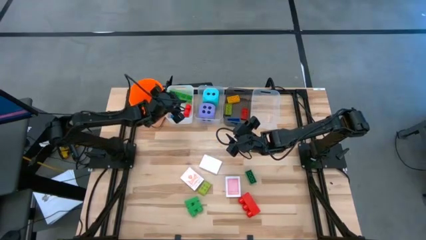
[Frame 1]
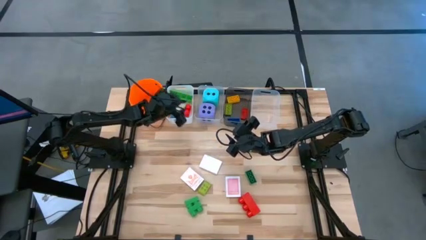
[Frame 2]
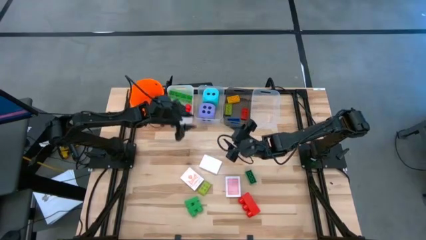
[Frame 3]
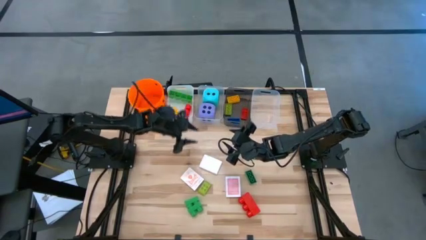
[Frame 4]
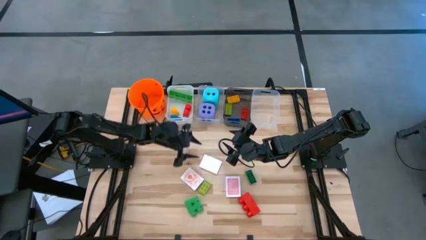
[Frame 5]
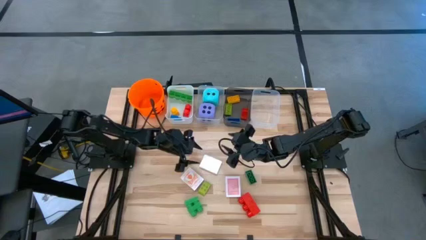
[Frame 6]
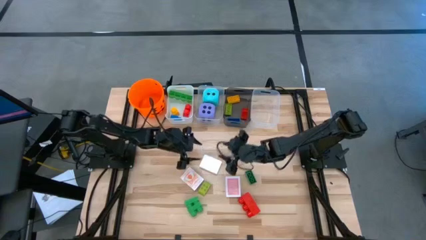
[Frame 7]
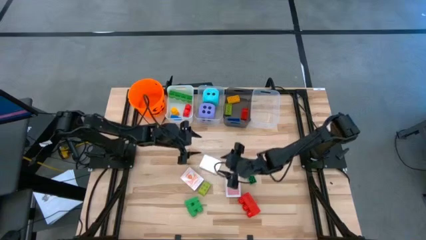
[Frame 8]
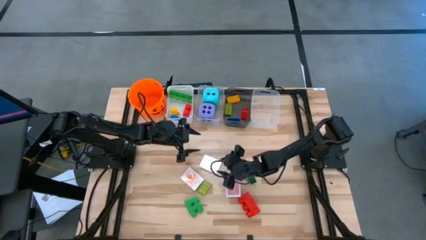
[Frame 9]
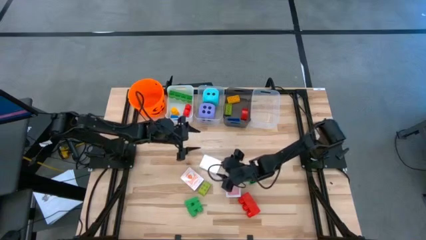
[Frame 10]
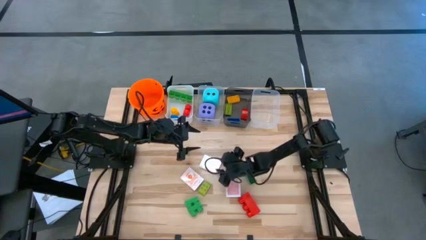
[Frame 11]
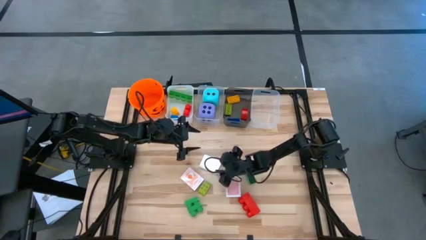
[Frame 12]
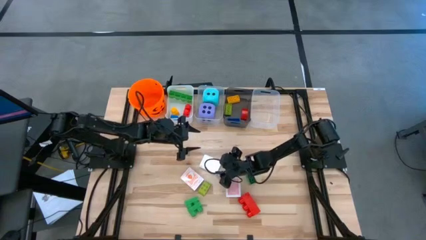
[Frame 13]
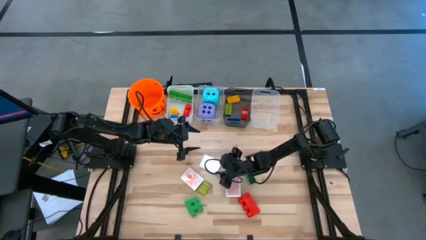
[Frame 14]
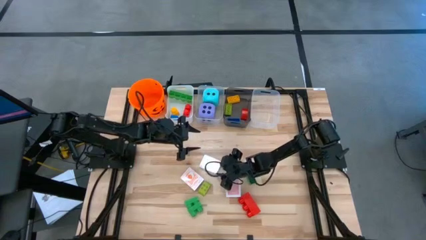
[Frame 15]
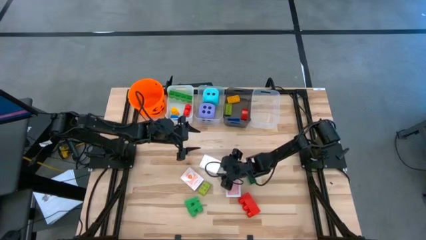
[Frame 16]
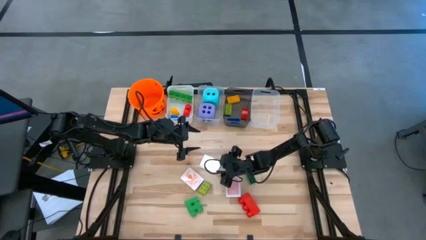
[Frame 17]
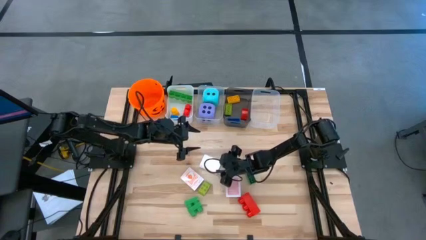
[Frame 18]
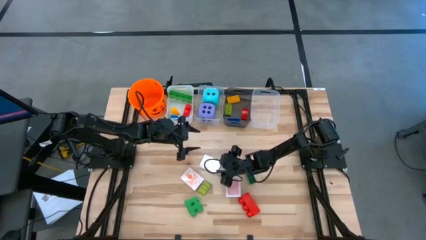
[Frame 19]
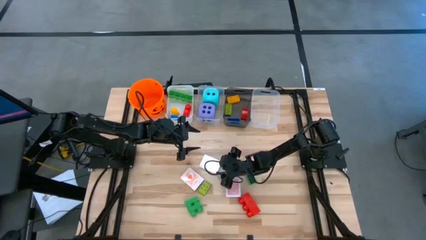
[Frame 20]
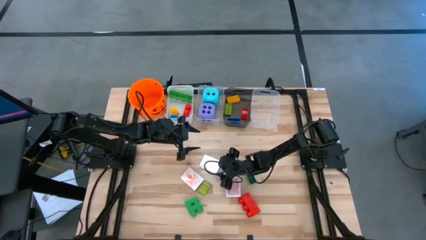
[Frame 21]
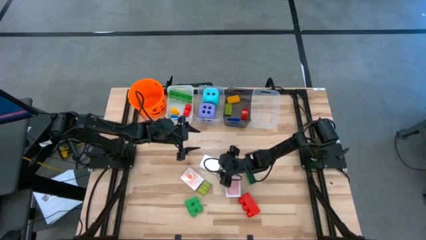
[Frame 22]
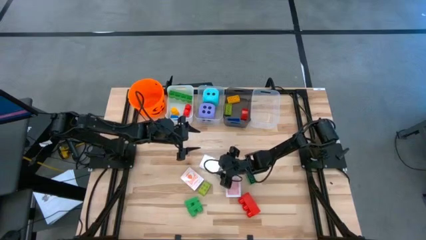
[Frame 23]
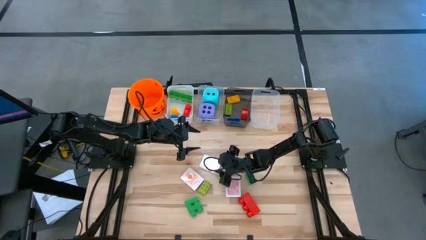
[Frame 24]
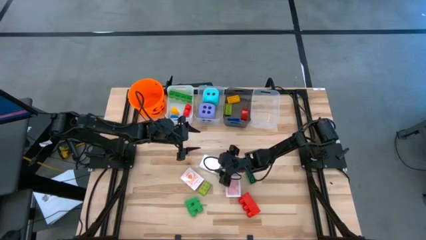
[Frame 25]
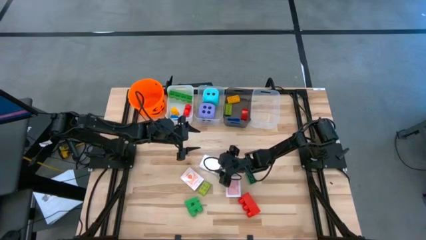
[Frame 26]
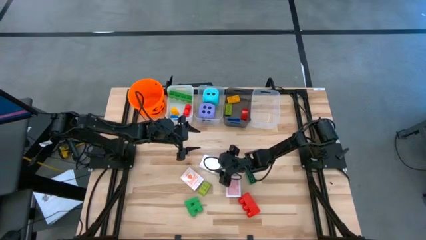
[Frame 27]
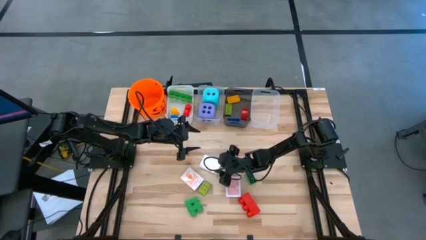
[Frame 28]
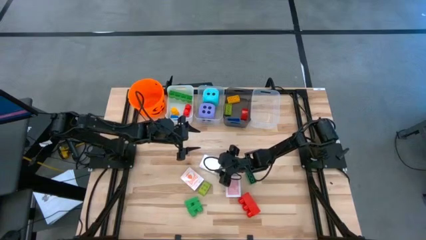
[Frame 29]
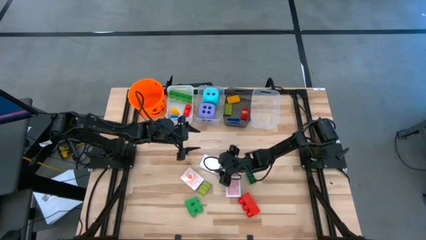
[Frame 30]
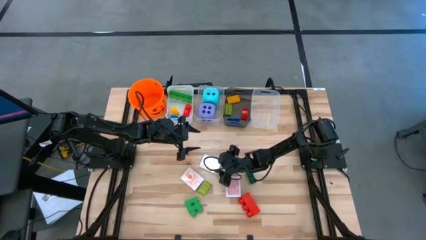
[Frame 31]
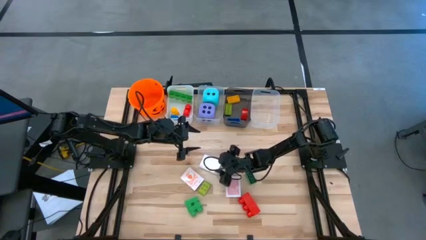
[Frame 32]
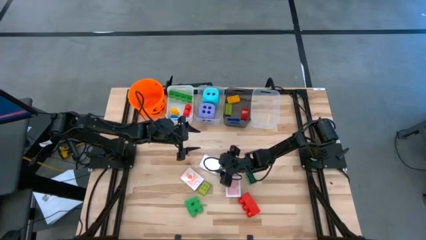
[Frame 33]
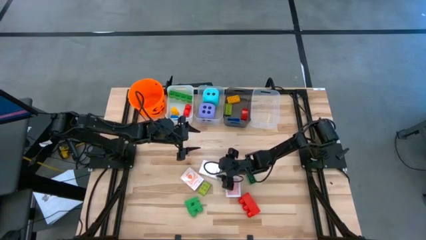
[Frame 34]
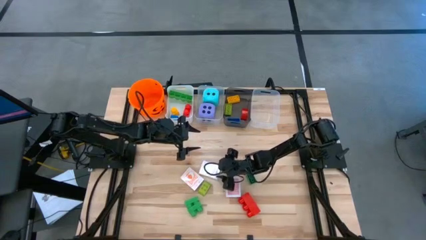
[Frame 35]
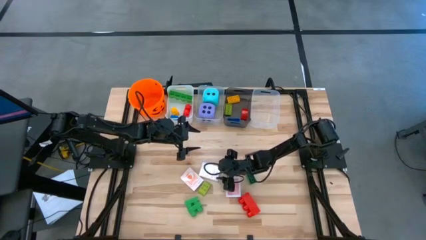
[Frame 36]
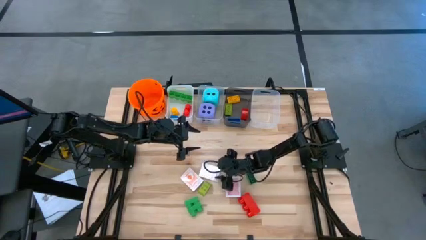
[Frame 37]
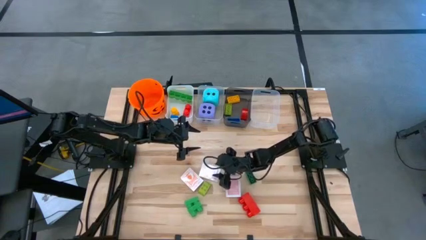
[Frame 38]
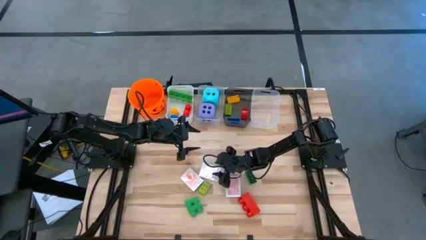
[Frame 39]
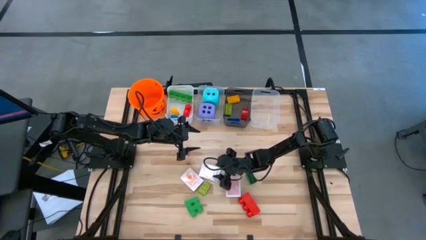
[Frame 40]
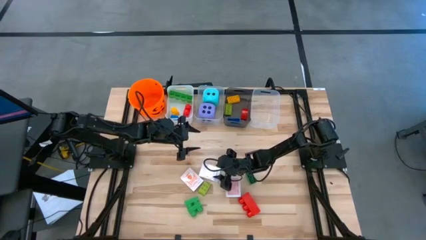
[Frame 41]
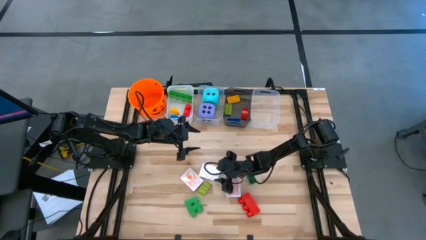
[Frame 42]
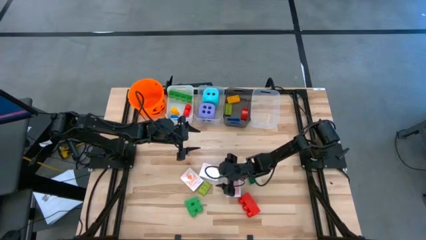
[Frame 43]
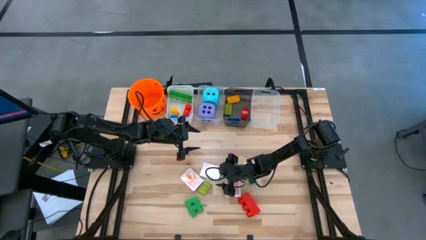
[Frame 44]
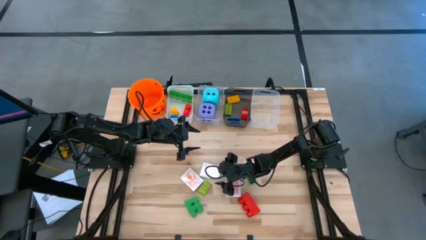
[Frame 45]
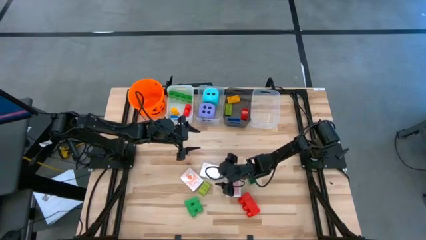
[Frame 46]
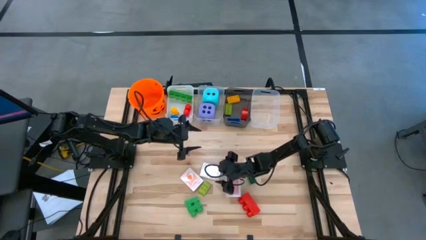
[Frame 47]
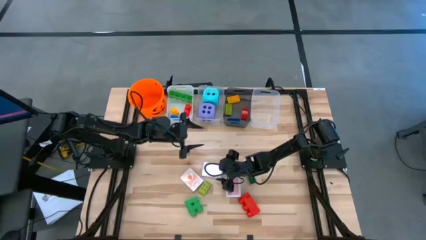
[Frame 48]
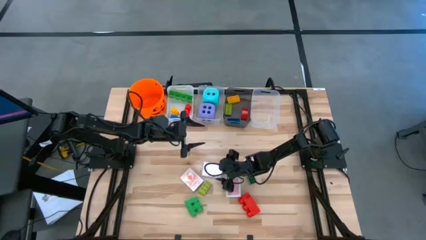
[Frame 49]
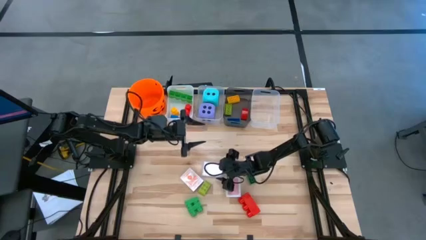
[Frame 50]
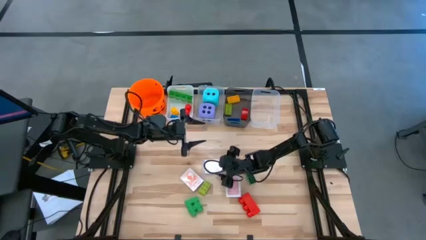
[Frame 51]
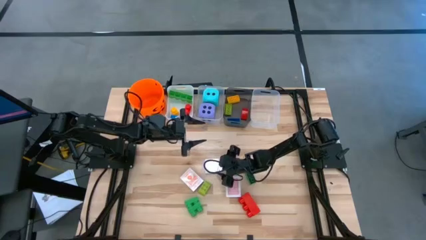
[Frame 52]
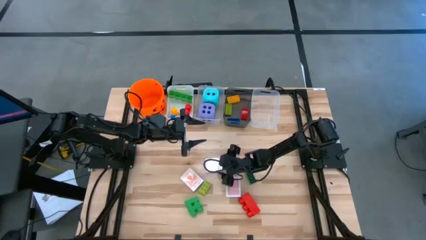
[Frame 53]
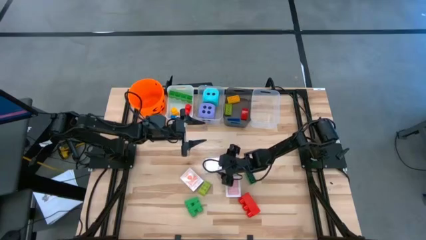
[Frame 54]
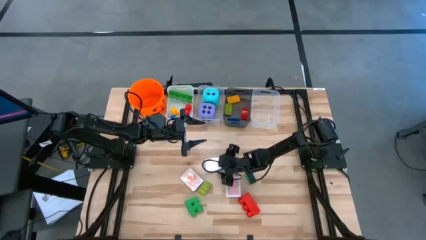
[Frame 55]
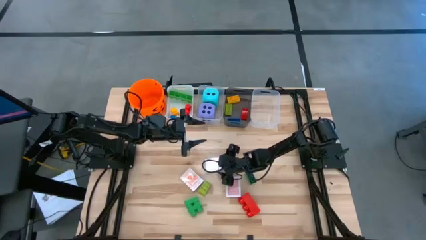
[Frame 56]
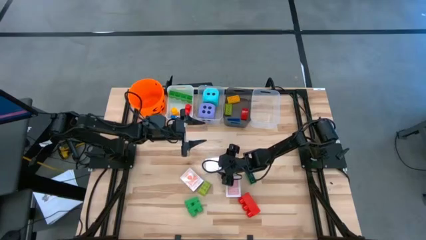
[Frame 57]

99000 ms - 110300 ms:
Task: Pick & Place Toys
Put the top red deck of cards into the right transparent bin

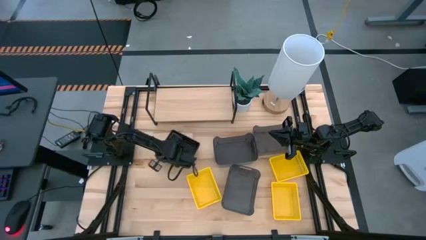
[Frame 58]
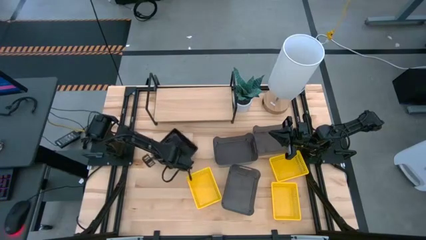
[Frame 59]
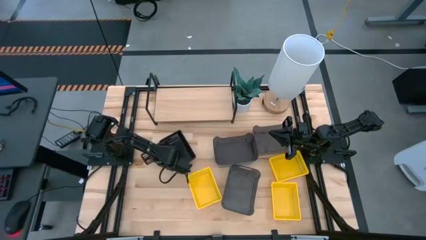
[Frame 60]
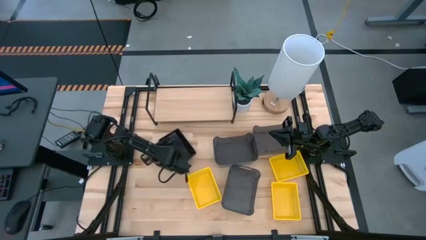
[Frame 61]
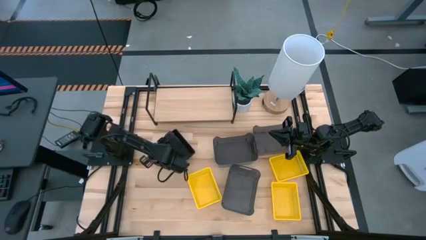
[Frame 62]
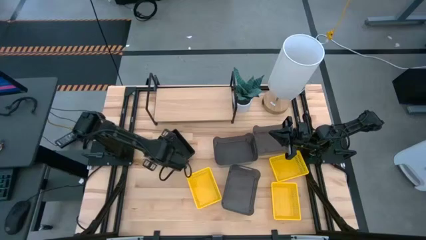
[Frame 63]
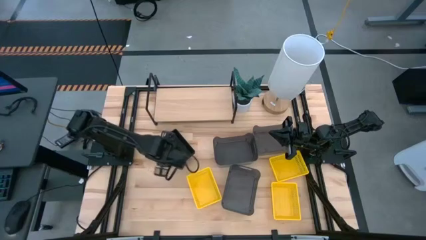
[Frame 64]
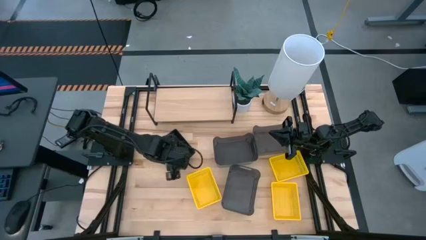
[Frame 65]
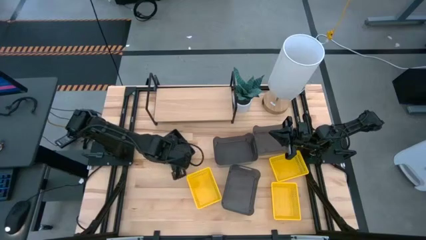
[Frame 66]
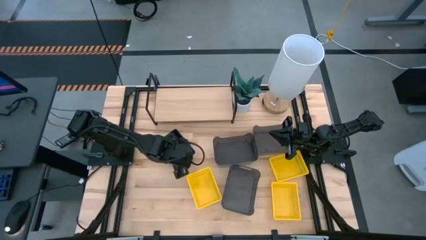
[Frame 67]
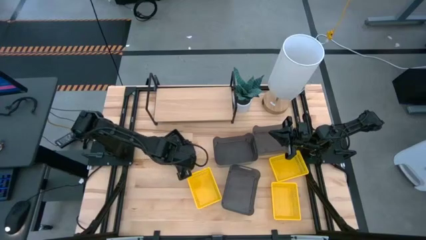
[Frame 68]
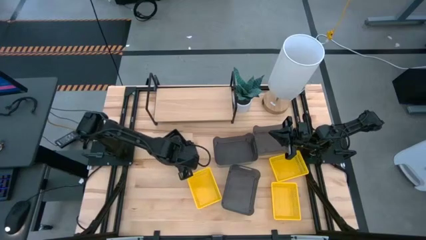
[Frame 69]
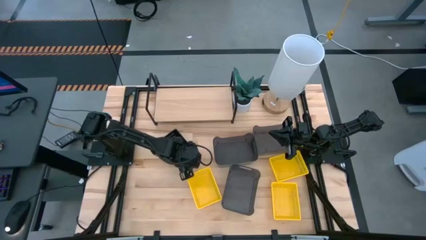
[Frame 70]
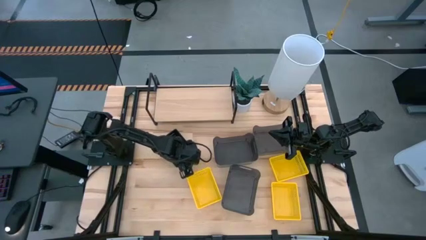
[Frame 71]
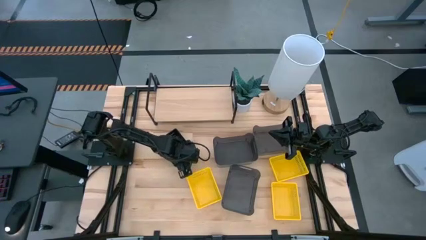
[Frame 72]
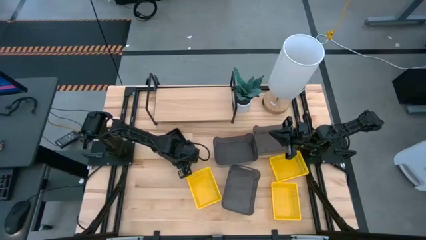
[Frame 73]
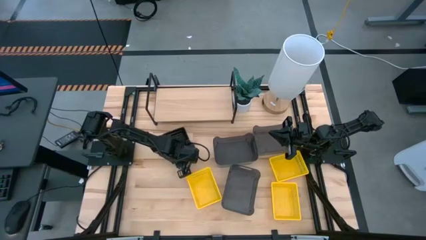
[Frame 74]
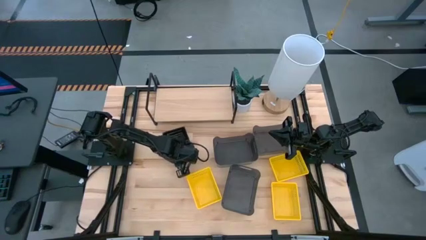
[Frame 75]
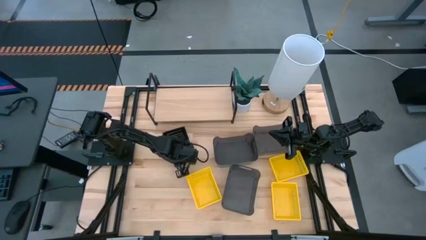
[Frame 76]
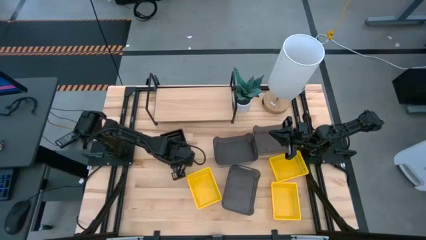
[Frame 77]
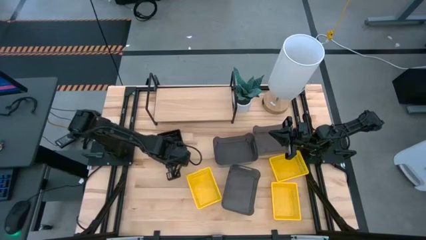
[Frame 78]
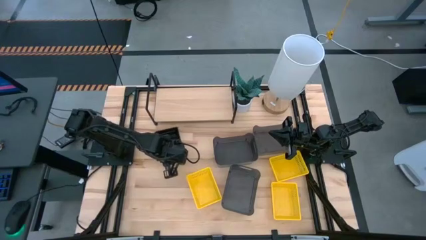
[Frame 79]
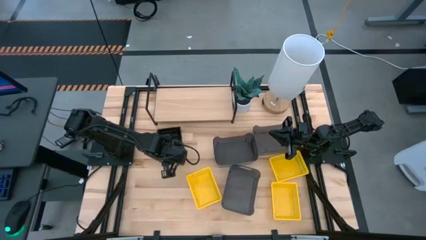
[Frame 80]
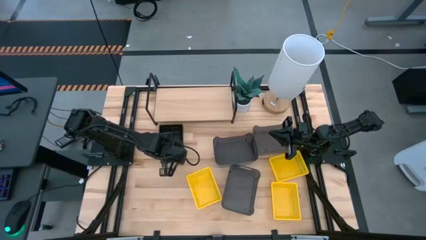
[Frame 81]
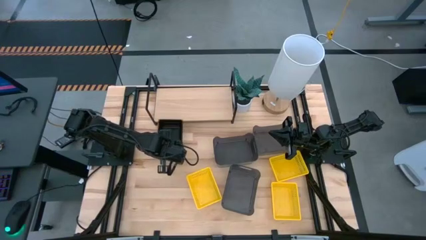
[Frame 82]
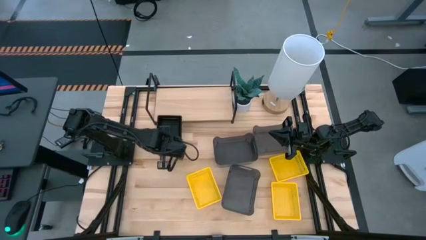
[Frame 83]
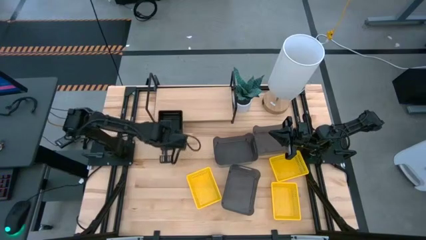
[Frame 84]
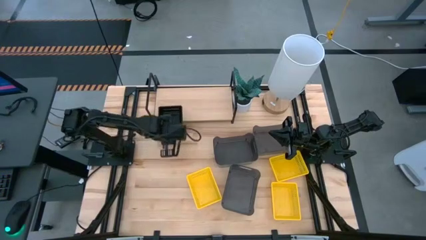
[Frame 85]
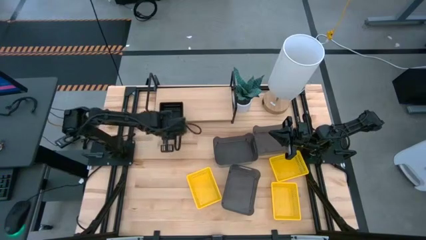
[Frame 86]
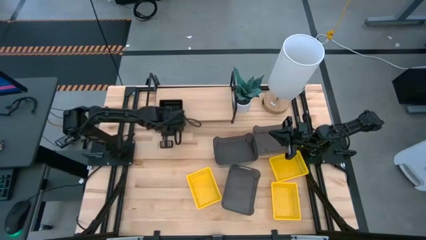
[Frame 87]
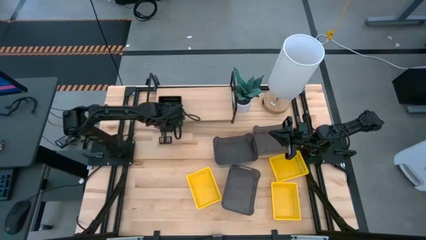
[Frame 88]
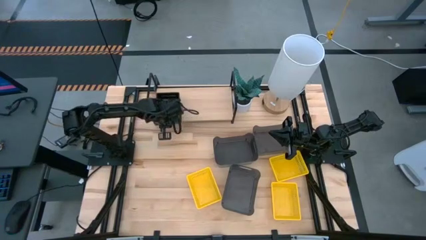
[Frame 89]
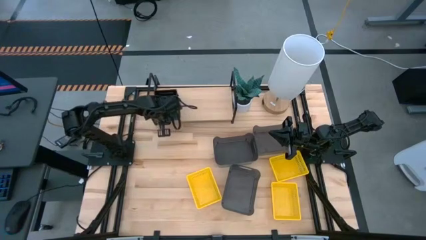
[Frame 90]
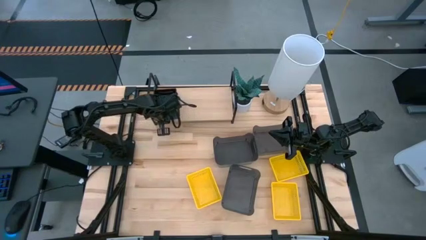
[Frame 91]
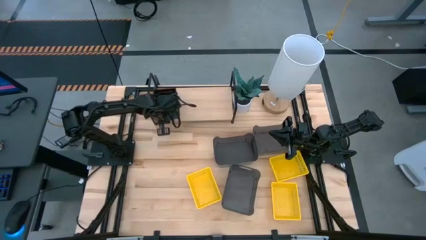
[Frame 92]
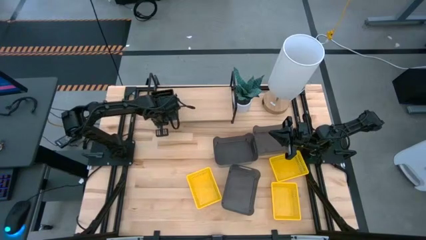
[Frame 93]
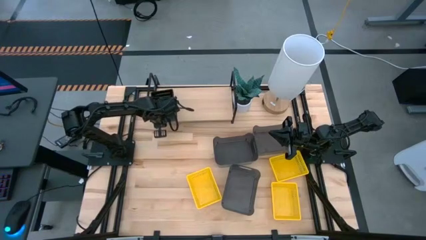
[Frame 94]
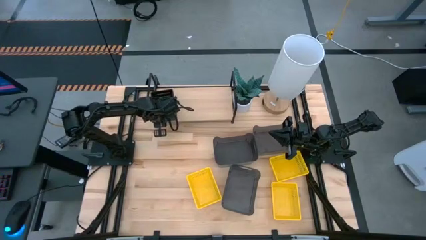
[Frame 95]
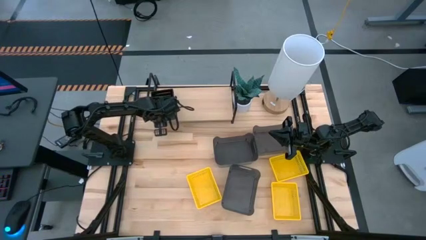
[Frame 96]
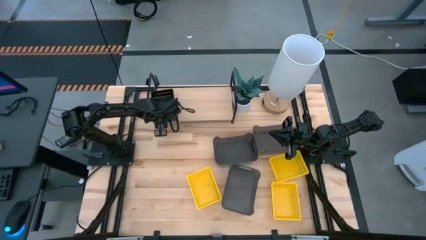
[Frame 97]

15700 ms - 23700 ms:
Task: Stack baskets on shelf by color
Put the black stacked bins on the shelf
